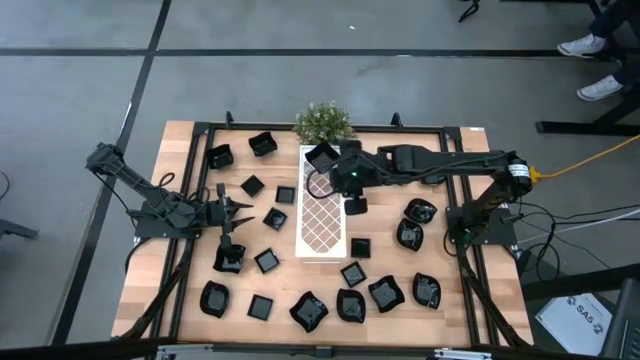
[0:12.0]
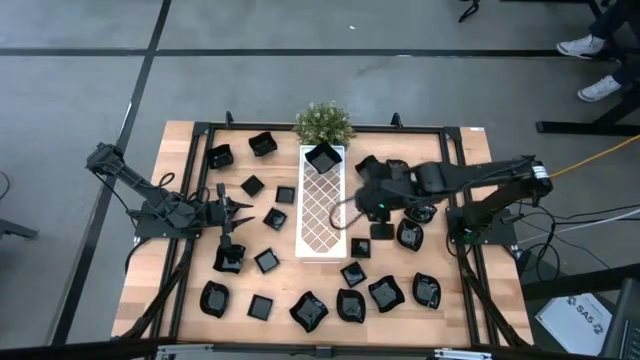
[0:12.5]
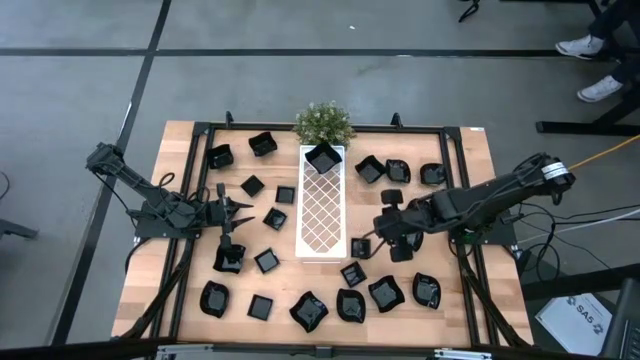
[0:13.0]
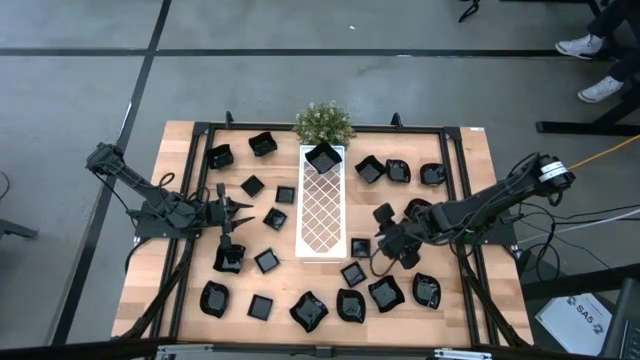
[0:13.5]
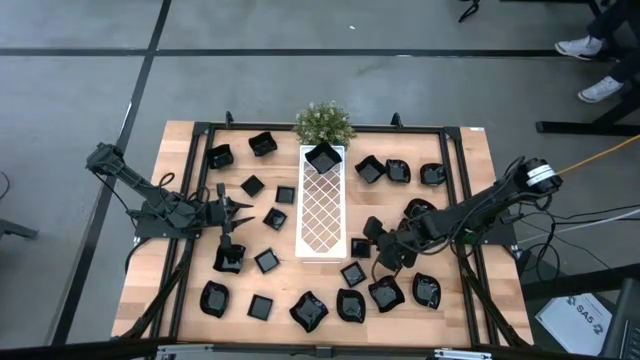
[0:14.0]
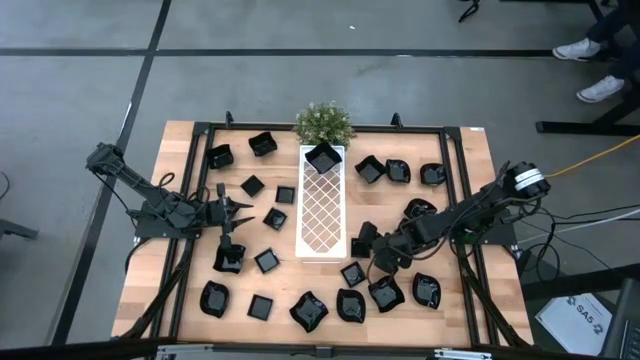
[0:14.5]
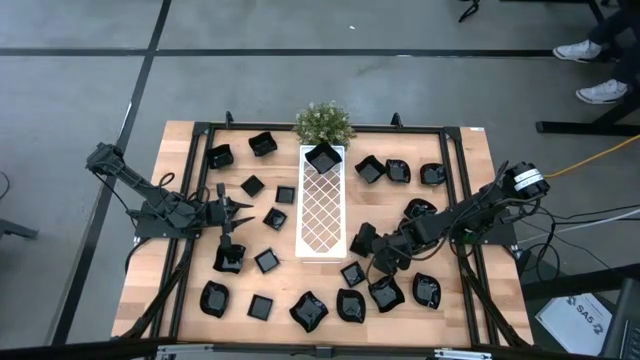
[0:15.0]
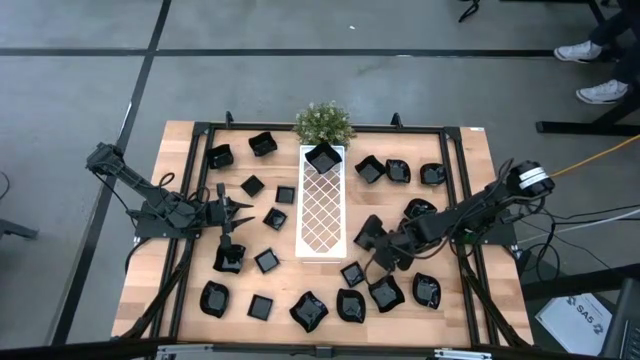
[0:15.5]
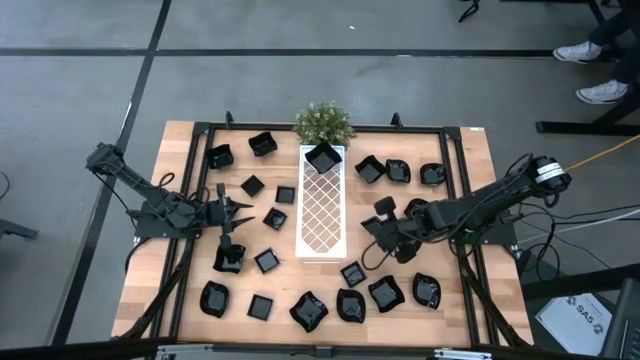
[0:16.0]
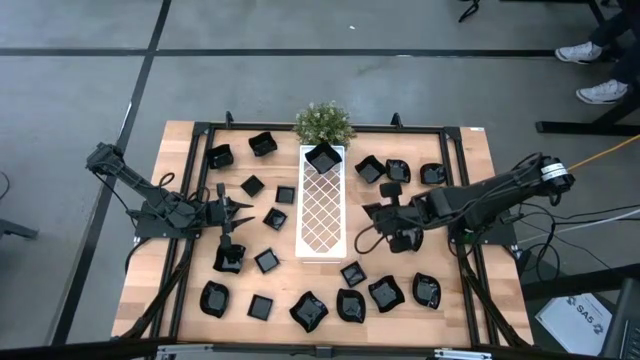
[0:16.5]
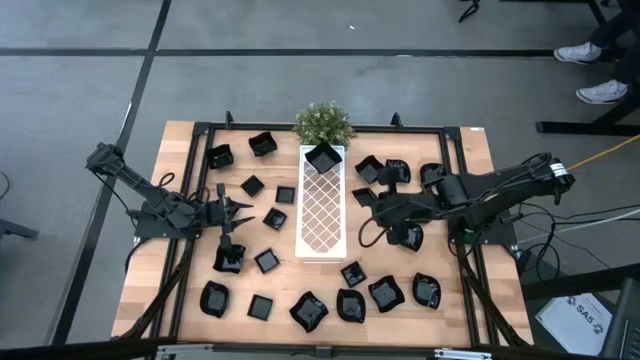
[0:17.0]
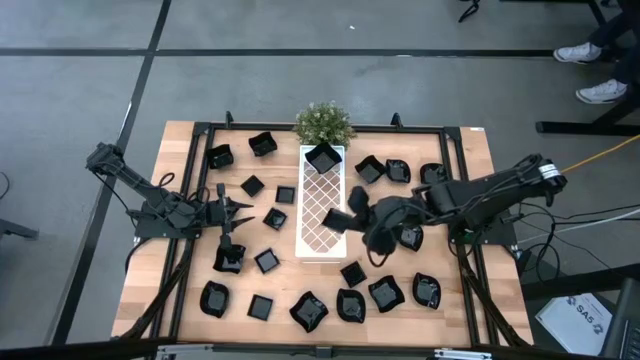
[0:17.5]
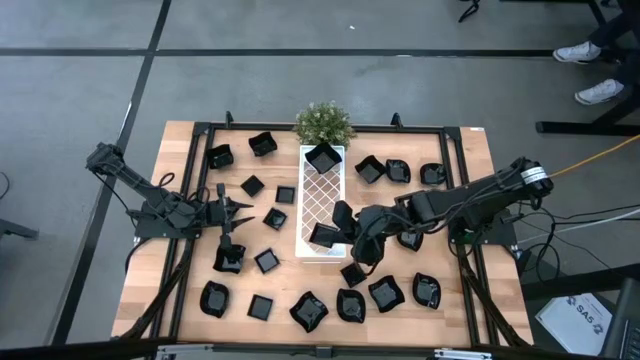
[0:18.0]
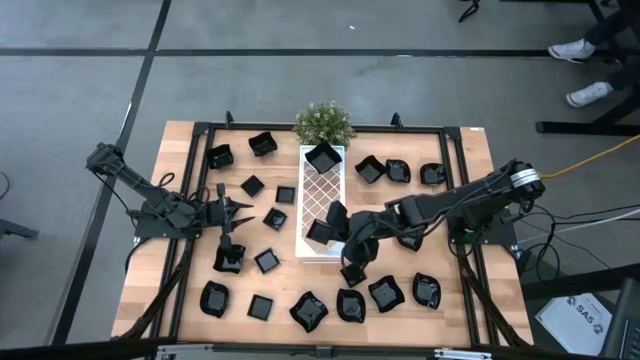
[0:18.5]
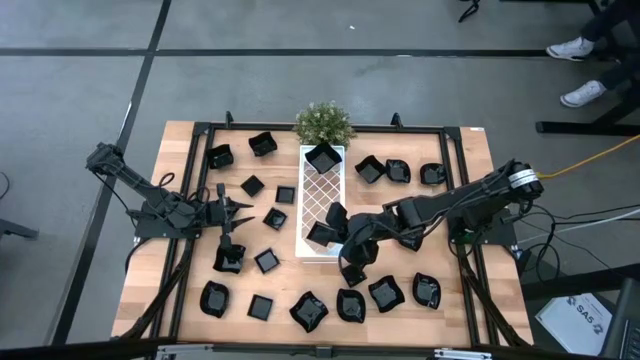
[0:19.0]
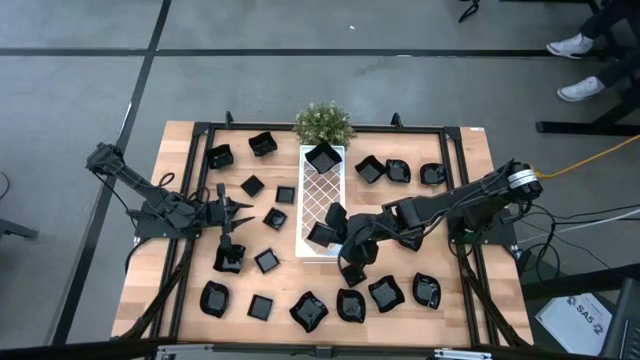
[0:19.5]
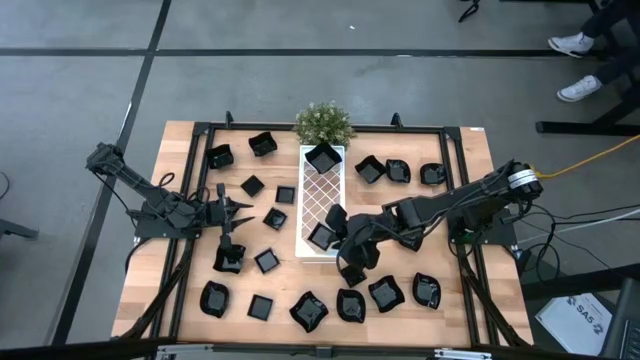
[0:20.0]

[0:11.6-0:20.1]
Task: Pick & Place Mini shaped plates
Put the square plate on the shelf

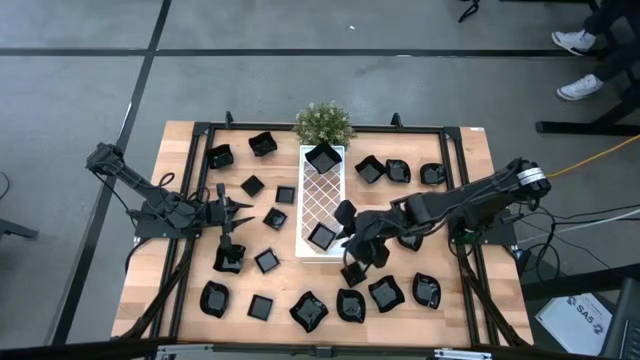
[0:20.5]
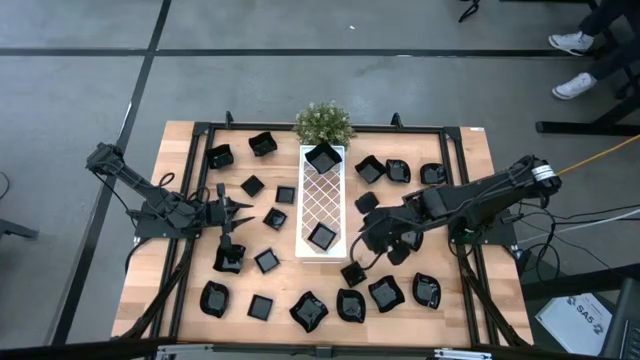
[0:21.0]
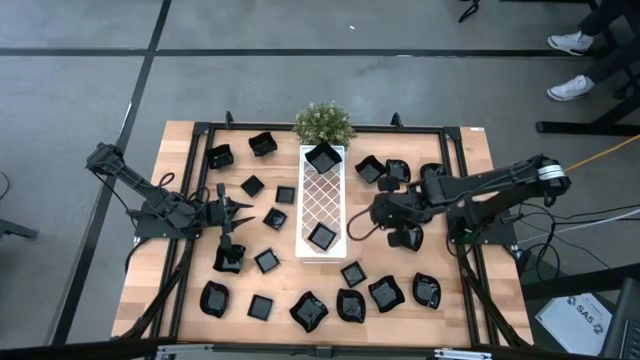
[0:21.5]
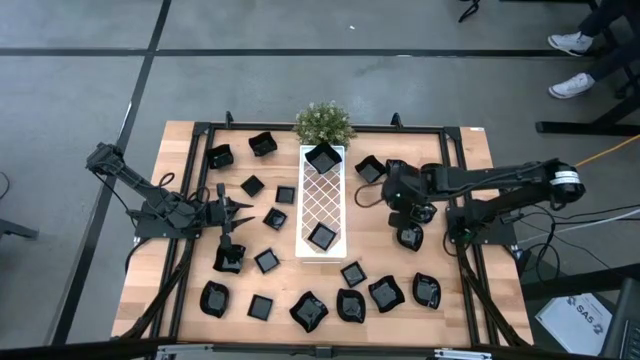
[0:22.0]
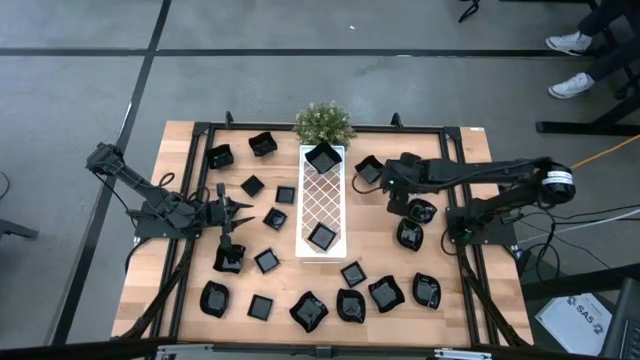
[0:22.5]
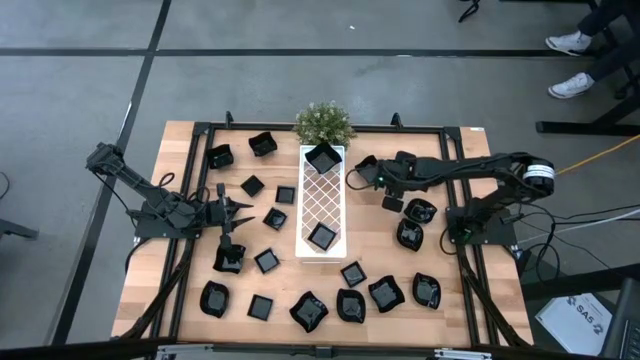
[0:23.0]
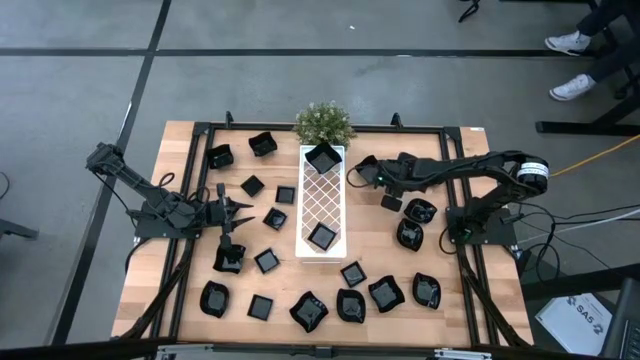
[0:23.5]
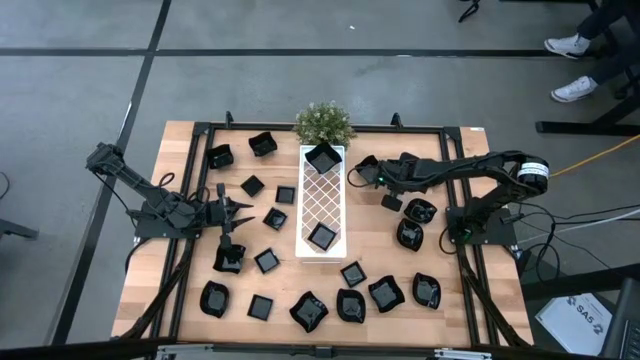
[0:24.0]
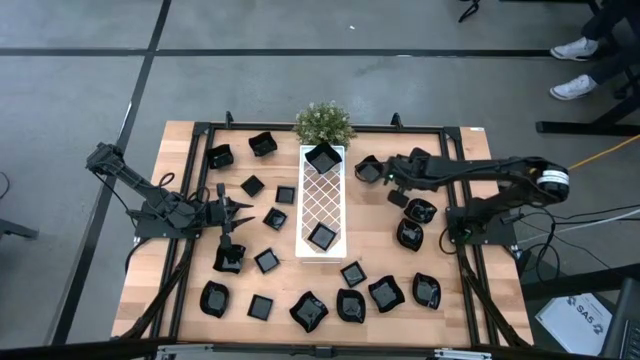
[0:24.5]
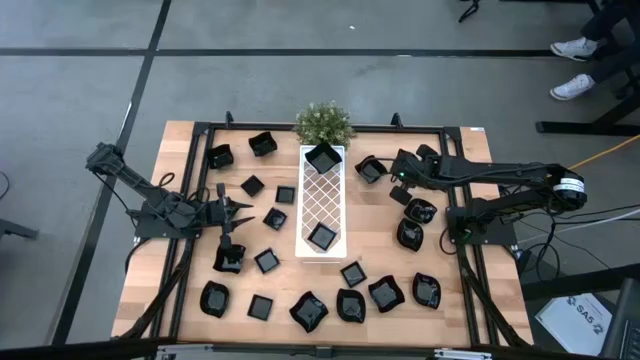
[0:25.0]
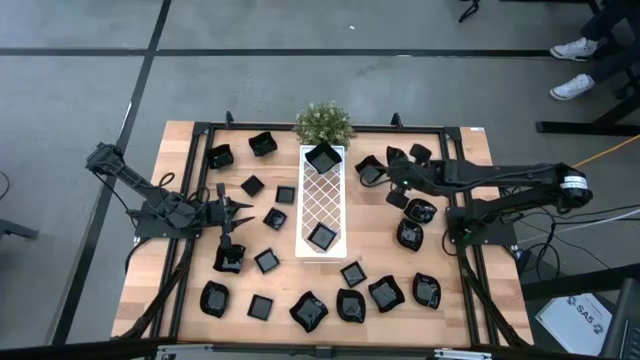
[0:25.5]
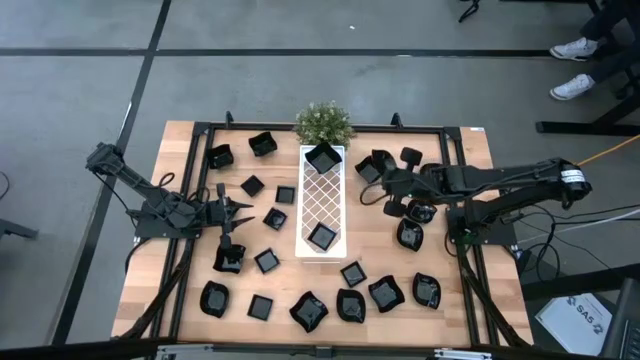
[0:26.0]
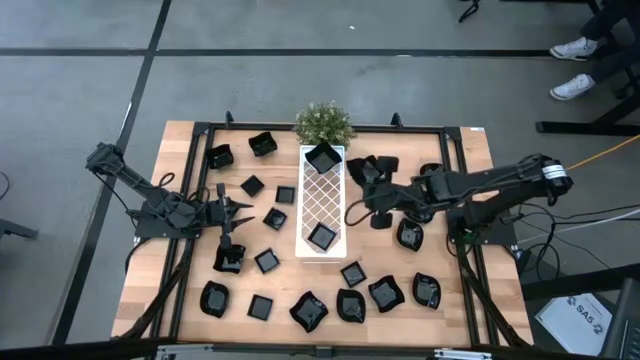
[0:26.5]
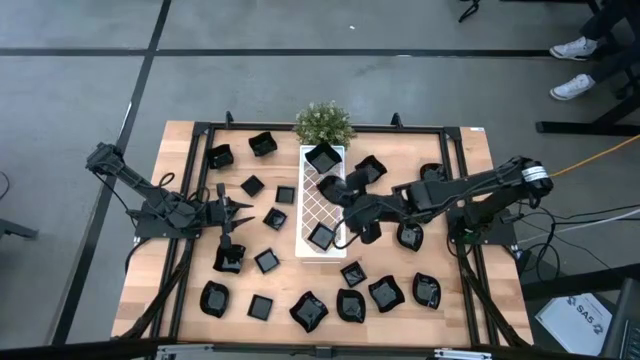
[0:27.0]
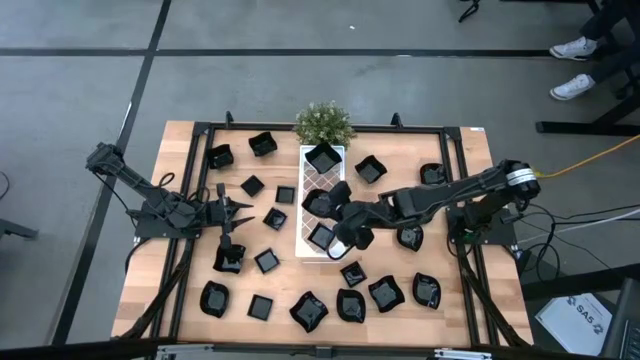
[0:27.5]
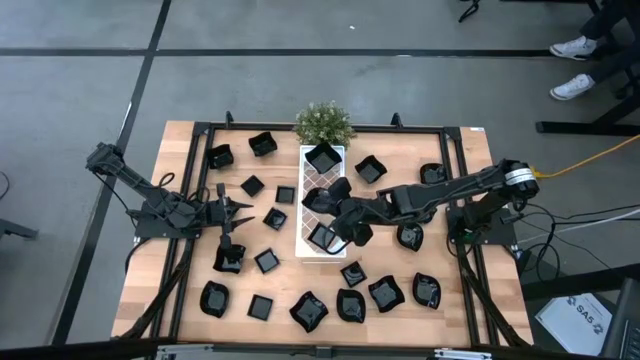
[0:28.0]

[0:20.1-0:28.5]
Put the leaf shaped plate on the shelf

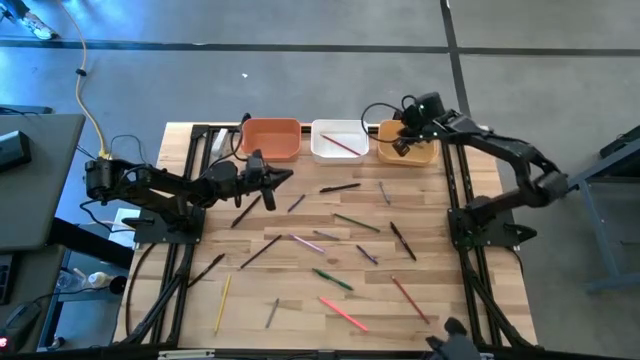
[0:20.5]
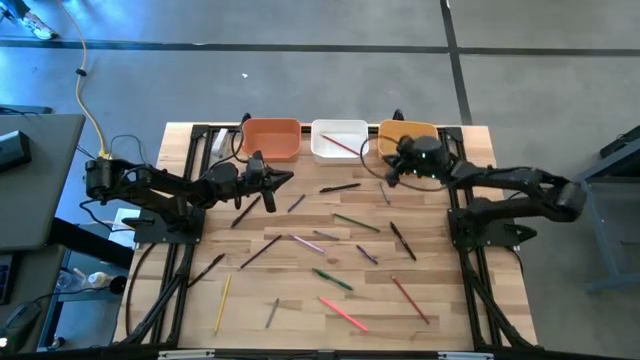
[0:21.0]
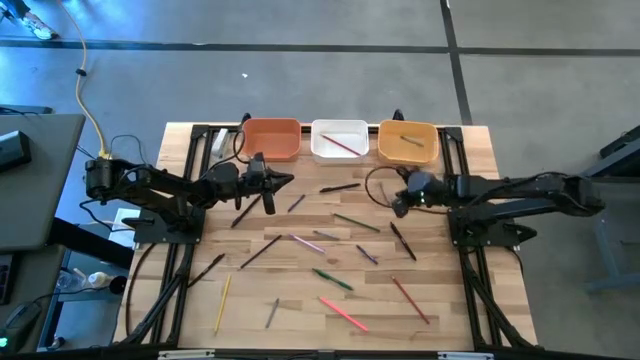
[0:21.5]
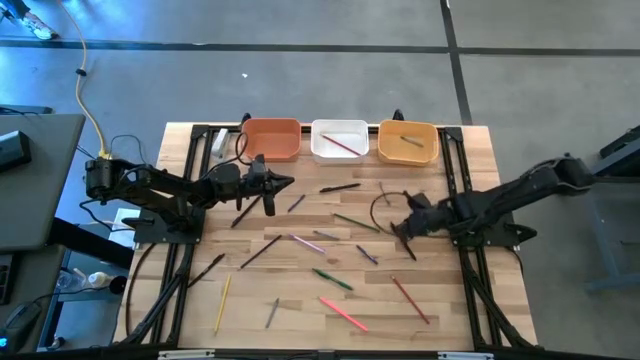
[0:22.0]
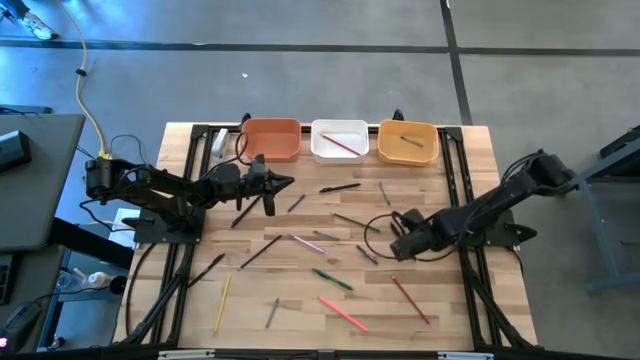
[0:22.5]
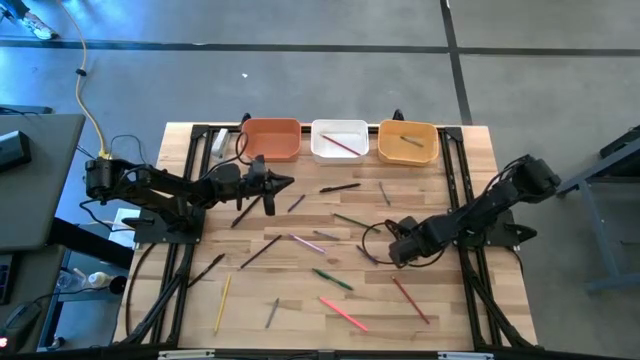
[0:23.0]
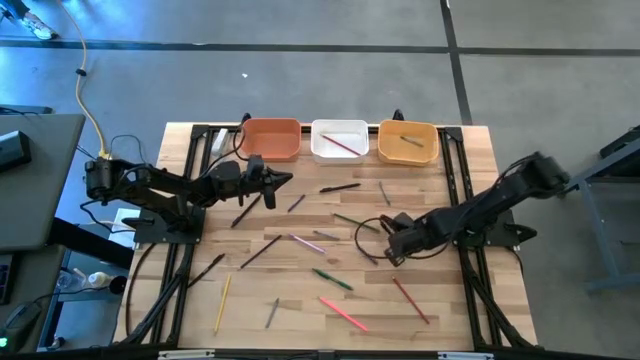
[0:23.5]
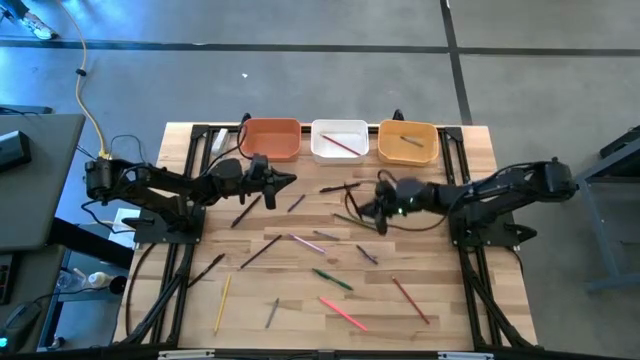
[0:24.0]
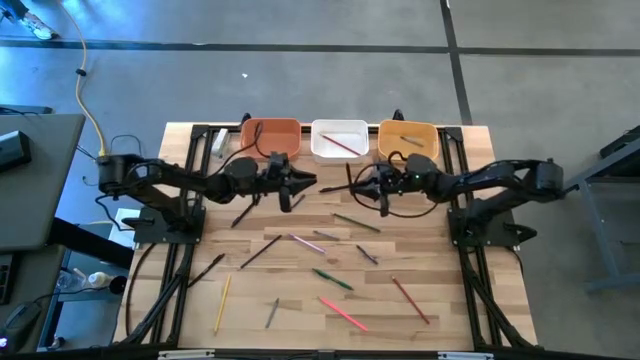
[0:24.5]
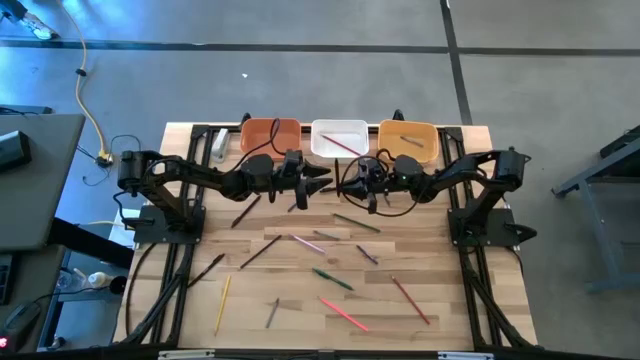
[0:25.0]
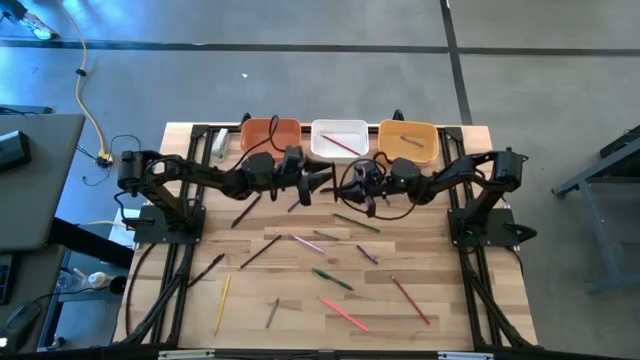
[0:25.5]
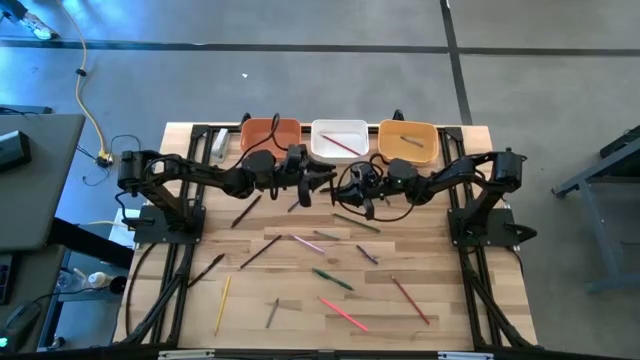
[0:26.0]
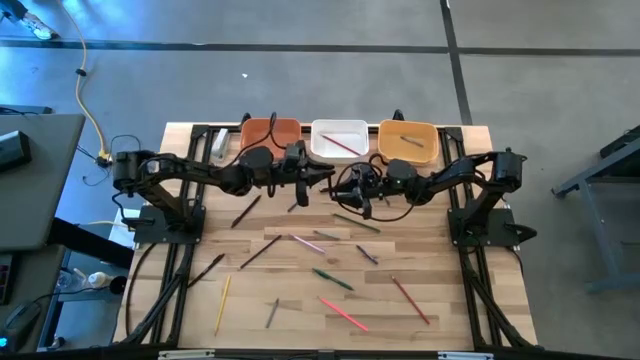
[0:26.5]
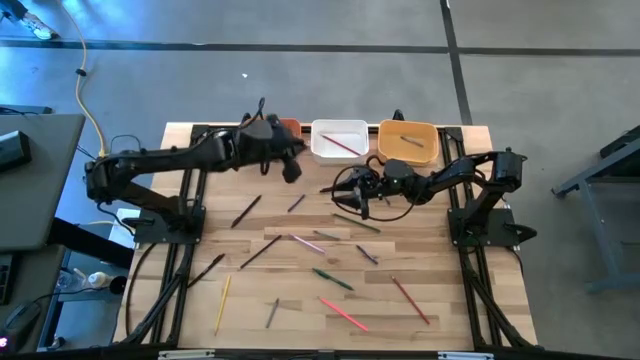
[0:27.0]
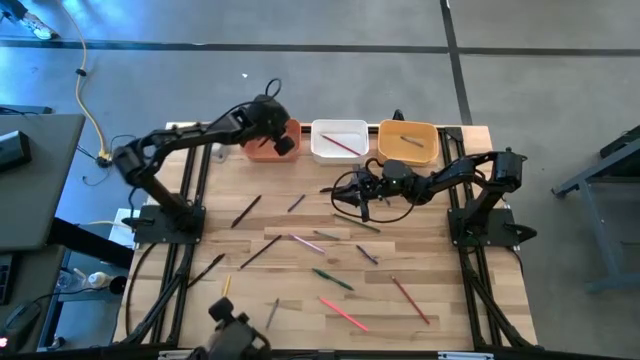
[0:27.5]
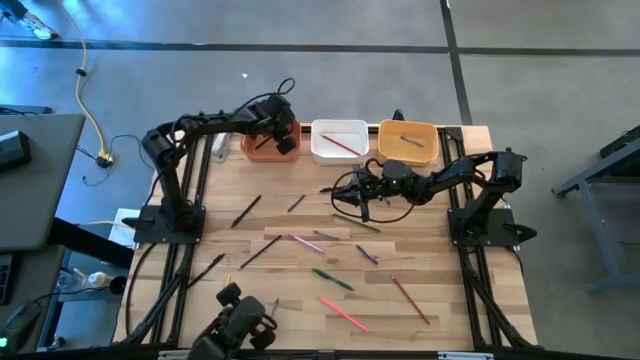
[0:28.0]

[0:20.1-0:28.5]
Task: Sort crayons/erasers/pens/pencils in bins
Put the middle right black pen into the orange bin
